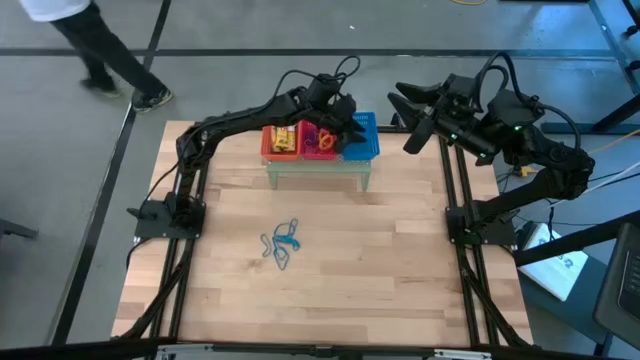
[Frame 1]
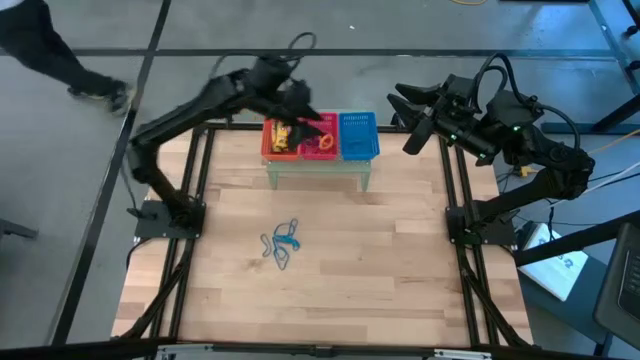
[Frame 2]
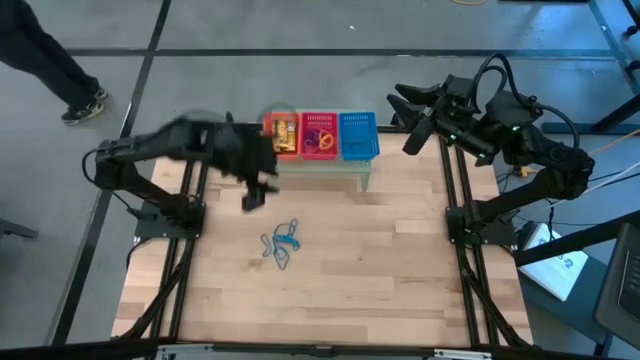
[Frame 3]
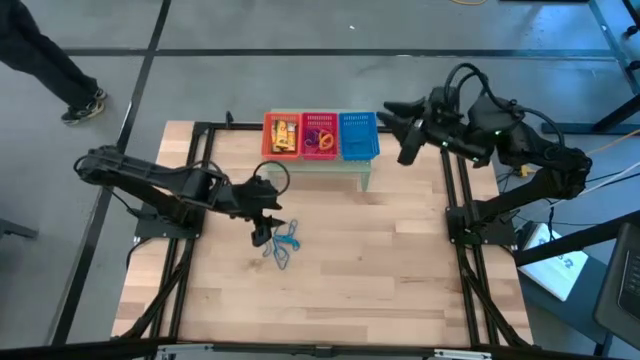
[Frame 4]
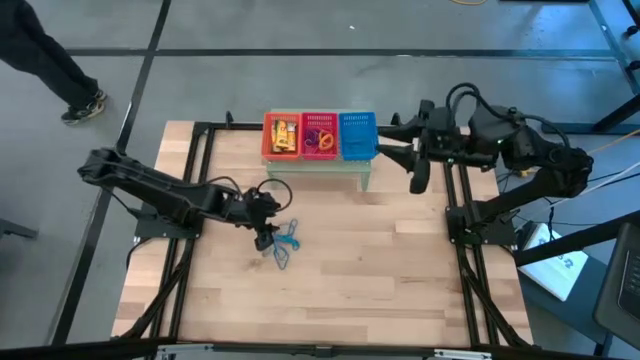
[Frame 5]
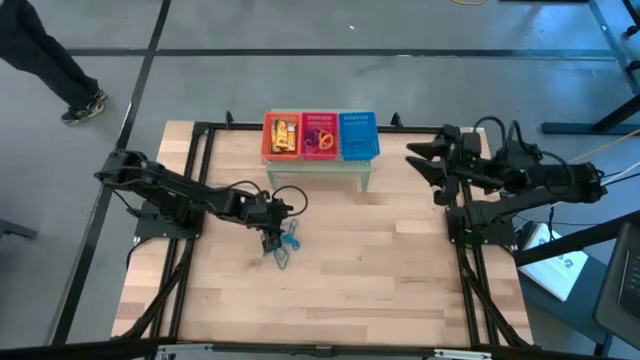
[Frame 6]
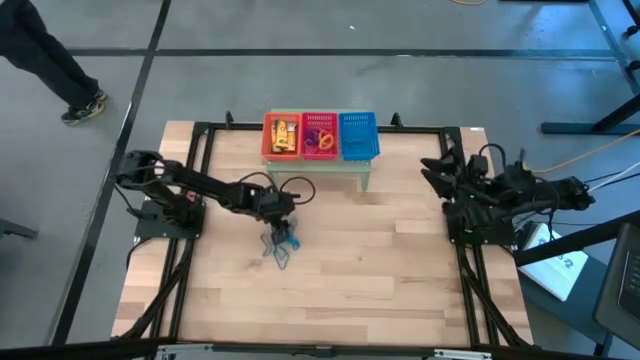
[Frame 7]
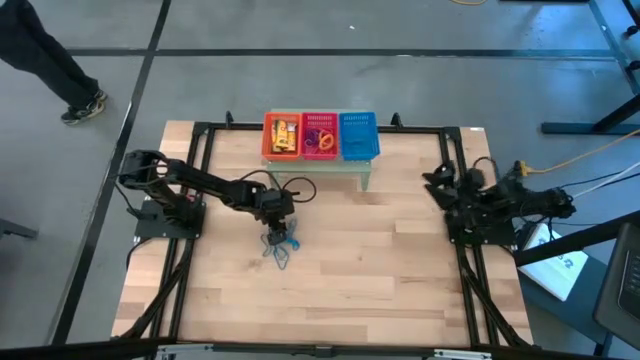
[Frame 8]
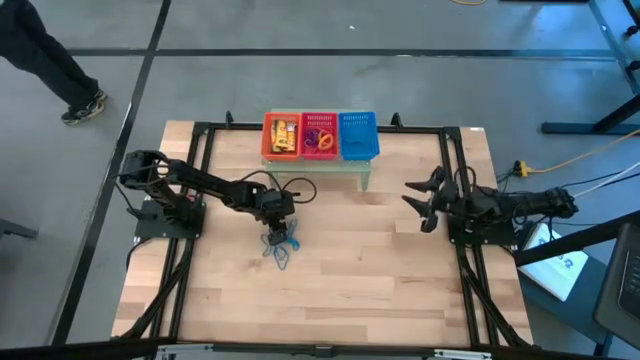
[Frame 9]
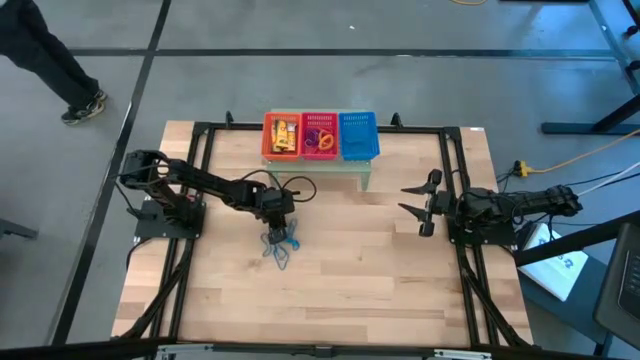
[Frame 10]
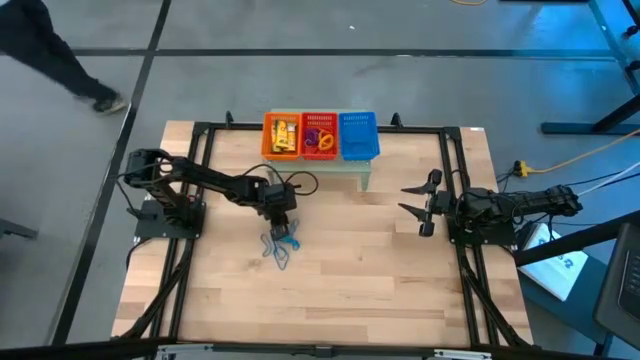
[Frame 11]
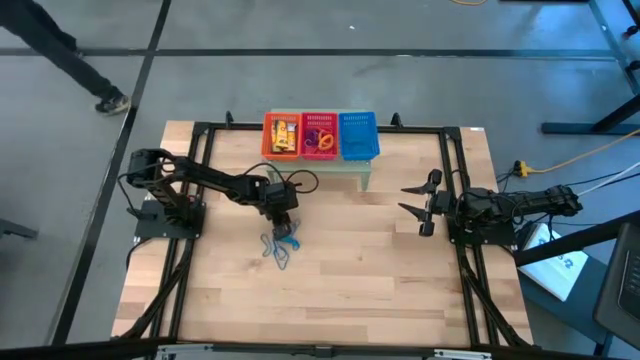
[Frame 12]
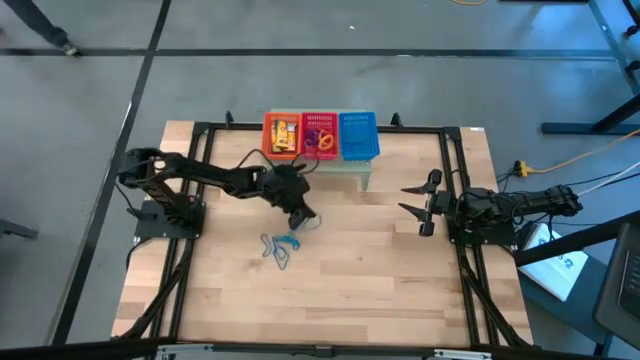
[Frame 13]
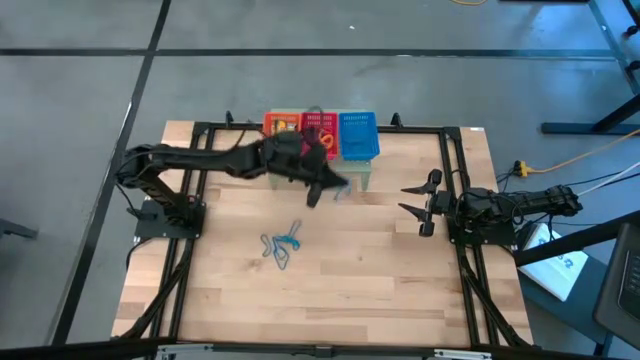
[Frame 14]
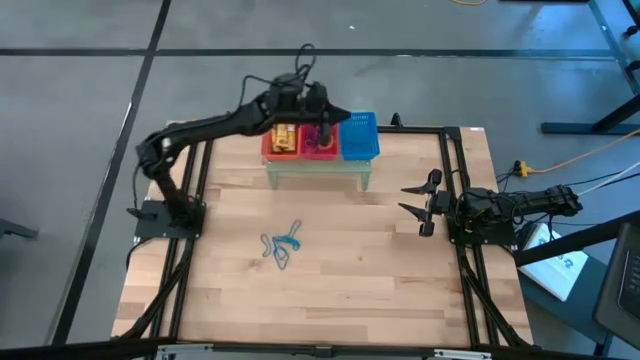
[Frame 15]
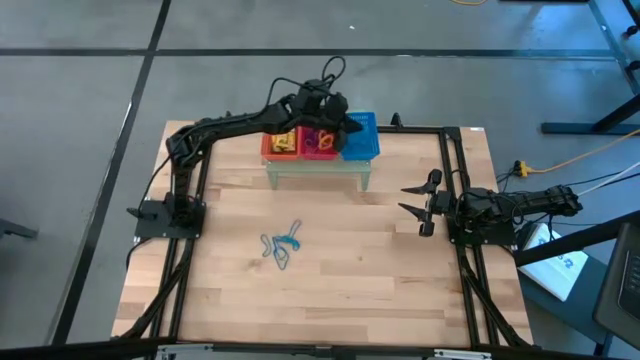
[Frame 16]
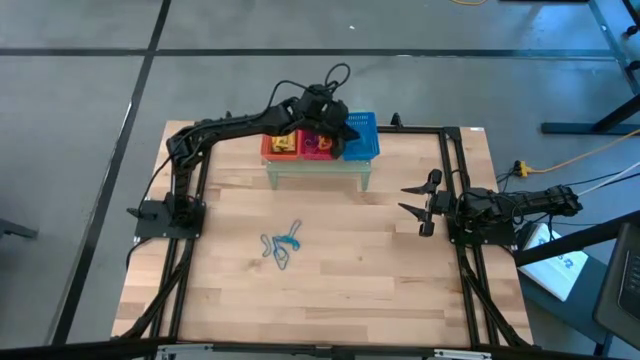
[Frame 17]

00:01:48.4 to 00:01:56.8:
Task: Pick & Place Office Desk Supplies
Put the blue rubber band into the blue bin on the shelf

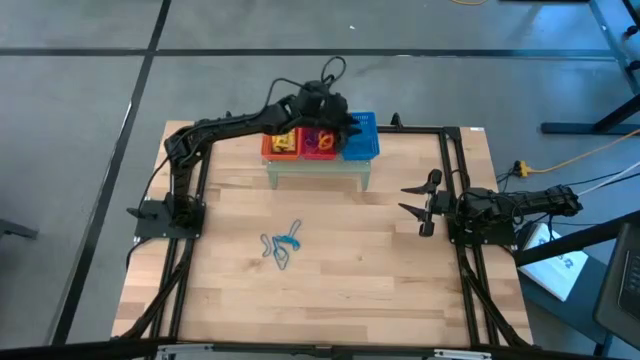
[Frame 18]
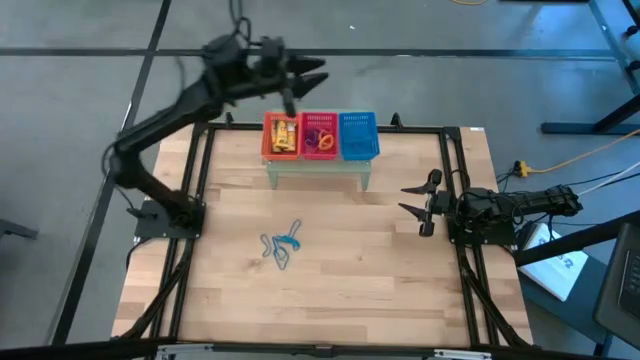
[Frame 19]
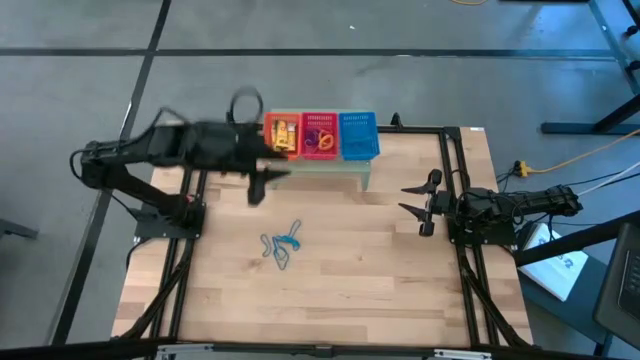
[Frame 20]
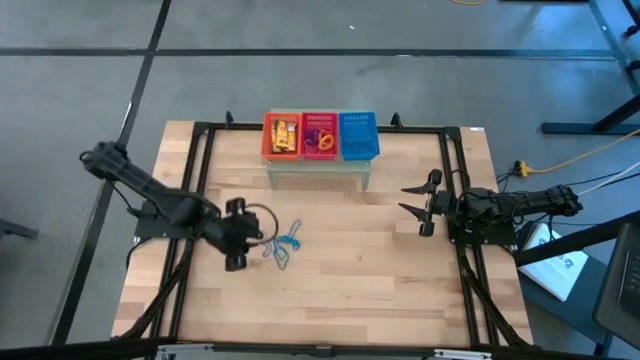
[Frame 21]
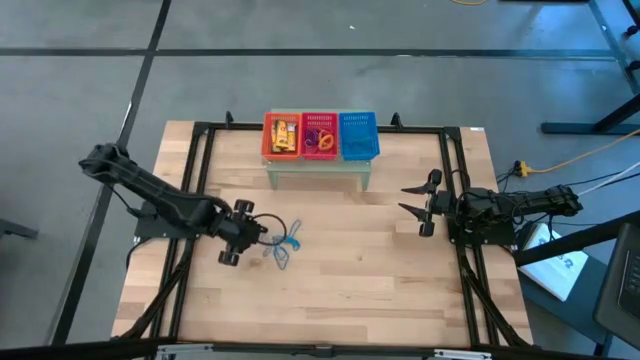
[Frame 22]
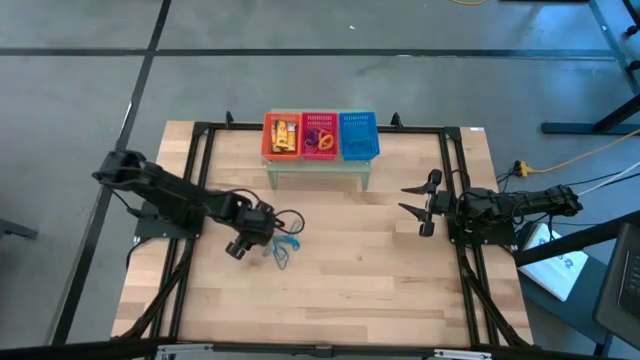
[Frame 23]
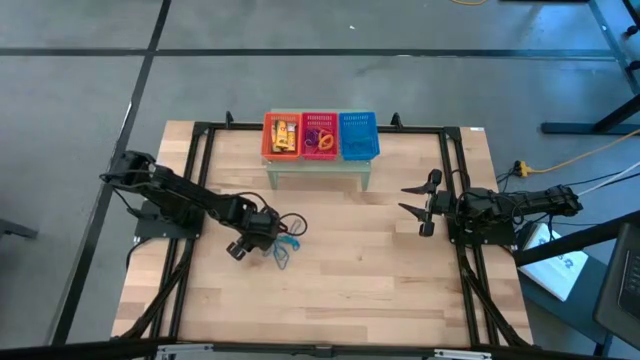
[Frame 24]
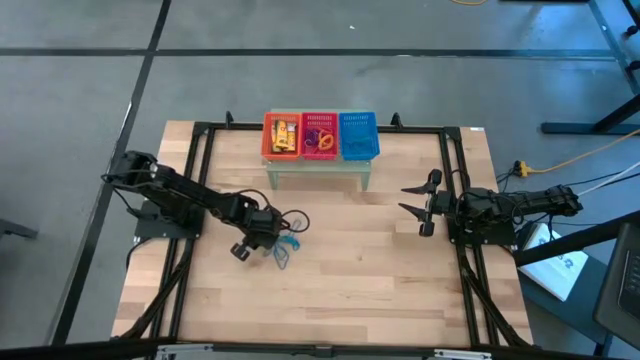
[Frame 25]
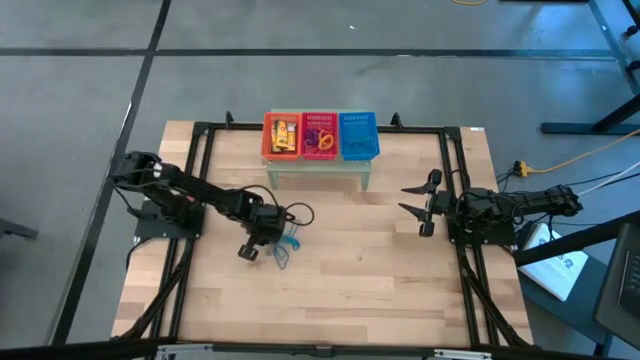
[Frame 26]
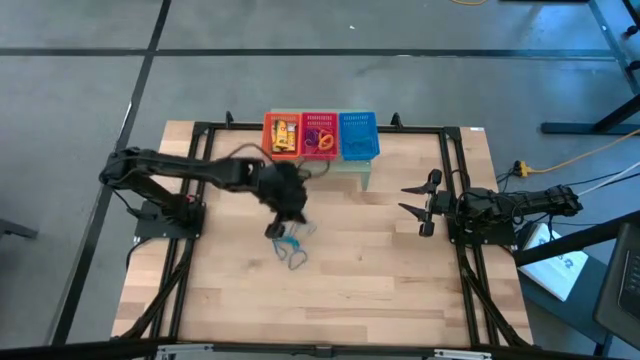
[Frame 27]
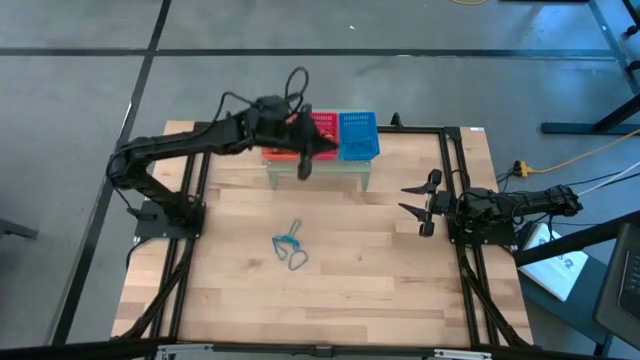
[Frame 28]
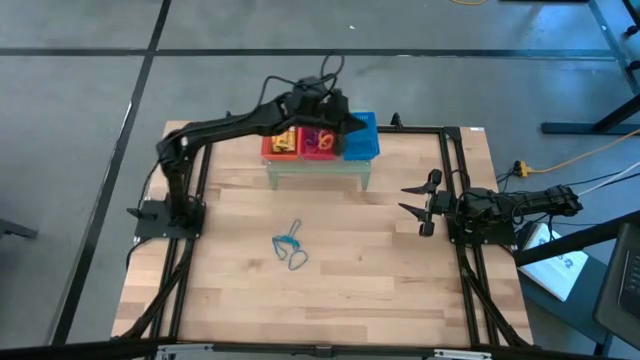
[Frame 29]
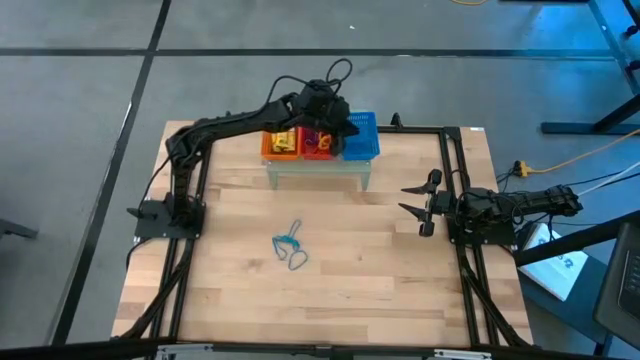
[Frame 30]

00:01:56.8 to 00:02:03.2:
Put the blue rubber band into the blue bin on the shelf

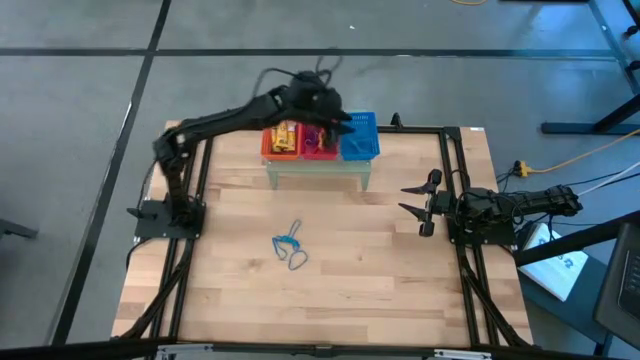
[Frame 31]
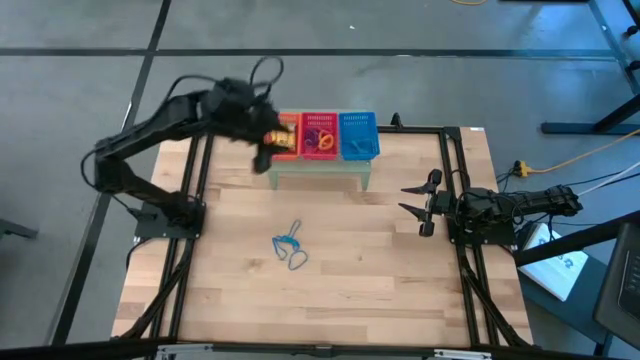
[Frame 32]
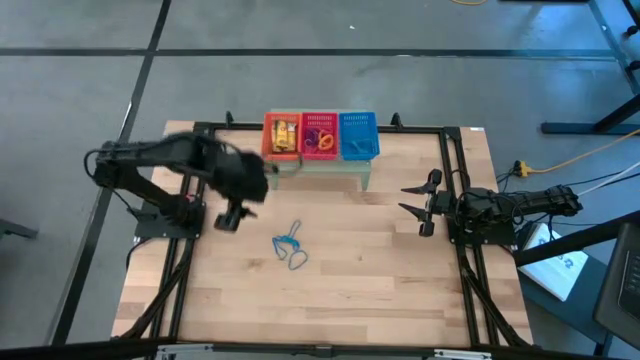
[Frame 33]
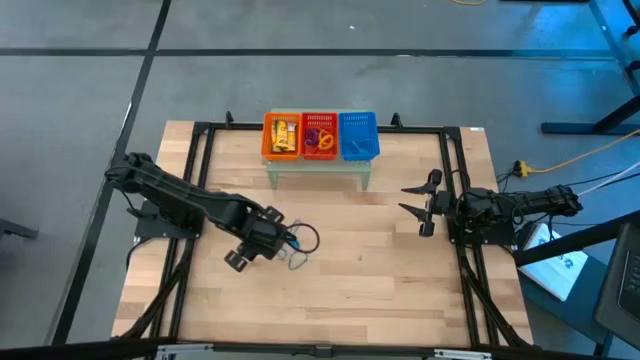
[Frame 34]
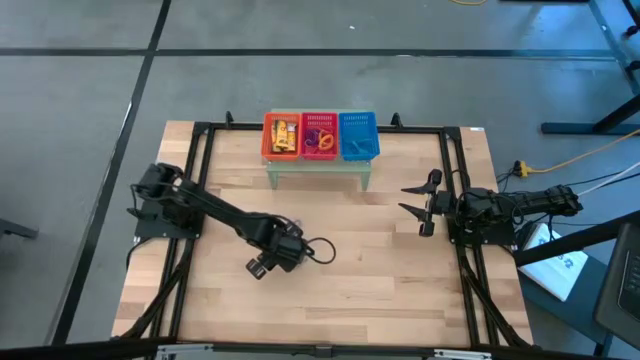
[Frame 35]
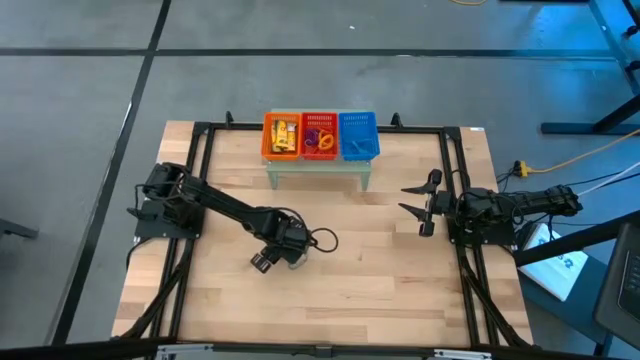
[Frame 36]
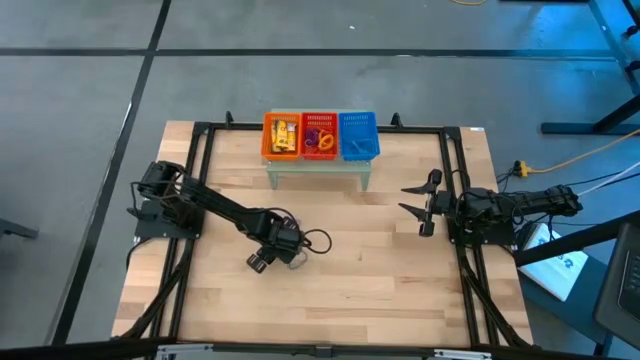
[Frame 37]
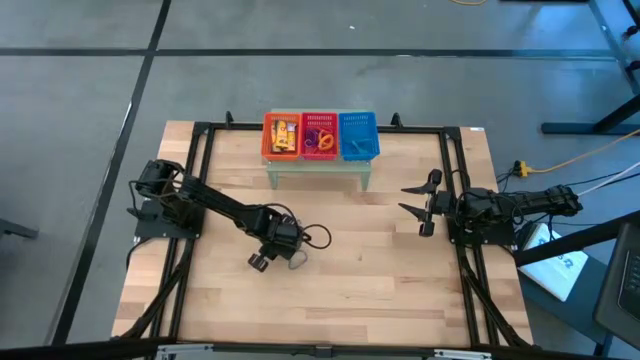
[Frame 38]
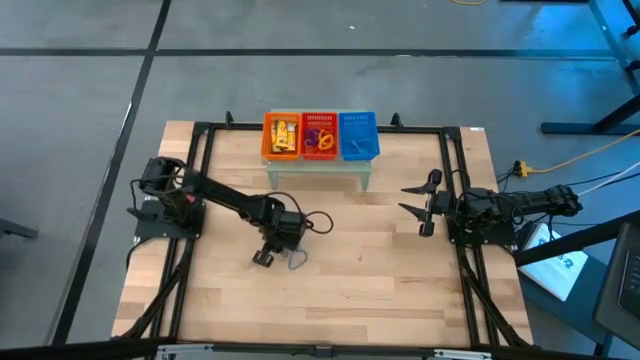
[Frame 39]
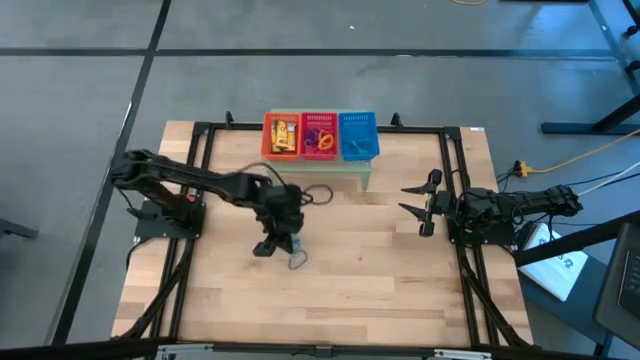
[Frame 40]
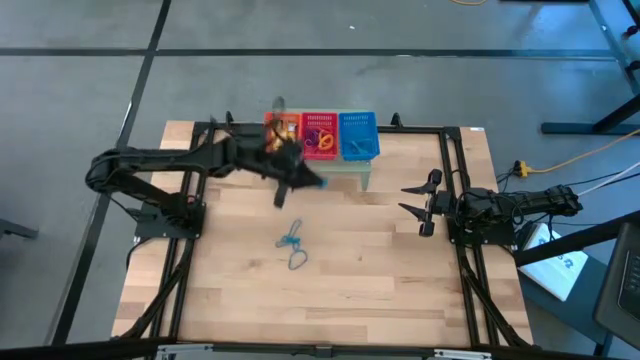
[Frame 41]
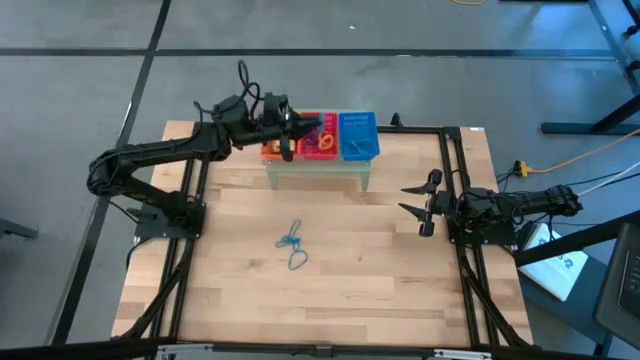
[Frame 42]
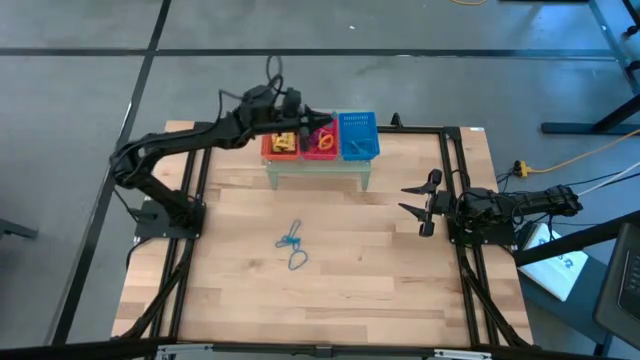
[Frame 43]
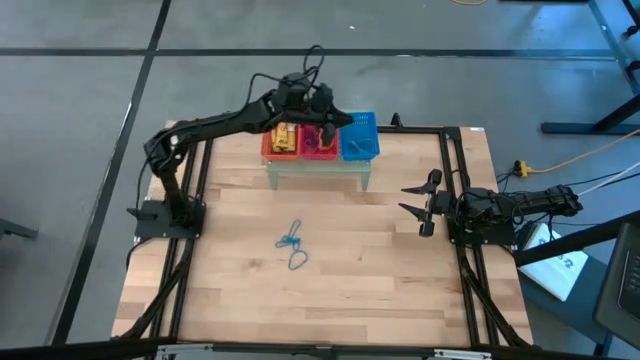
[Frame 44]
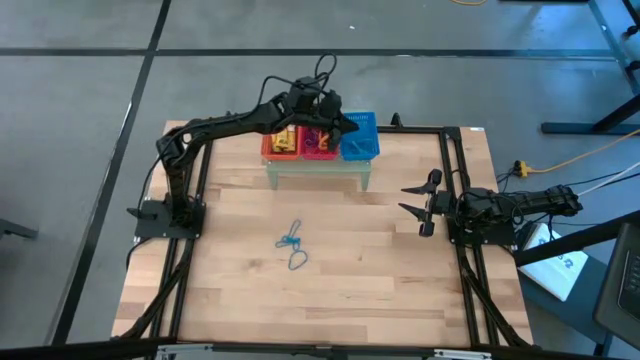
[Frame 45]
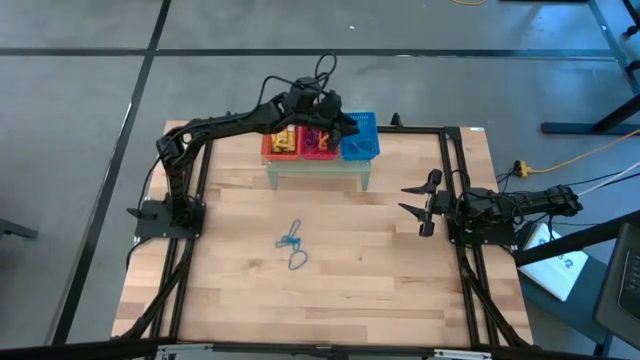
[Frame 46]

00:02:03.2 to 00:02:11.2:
Put the blue rubber band into the blue bin on the shelf
